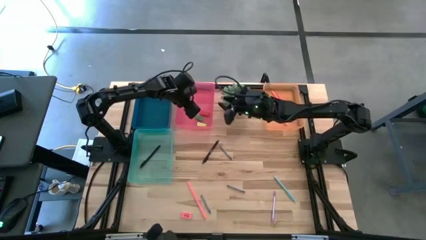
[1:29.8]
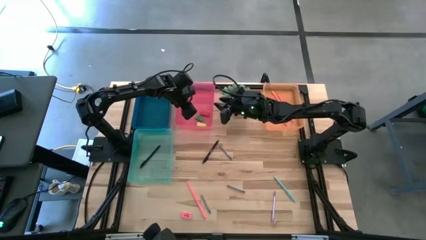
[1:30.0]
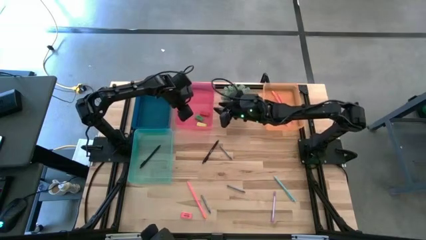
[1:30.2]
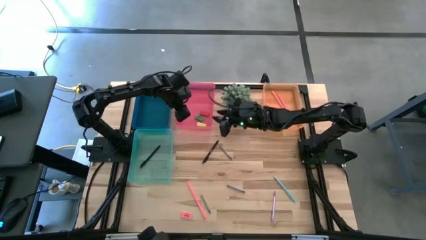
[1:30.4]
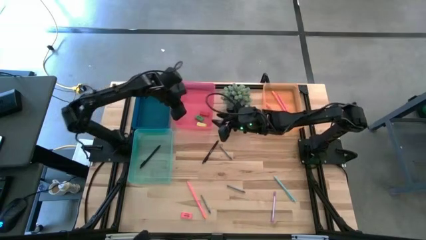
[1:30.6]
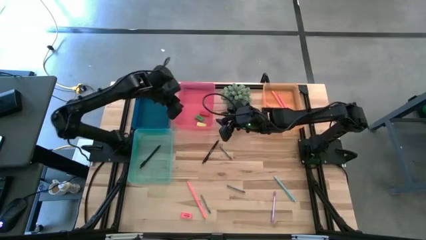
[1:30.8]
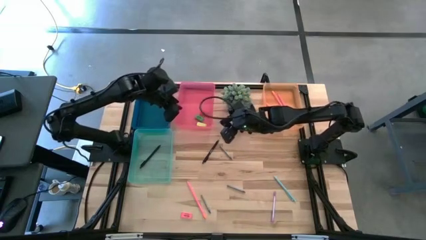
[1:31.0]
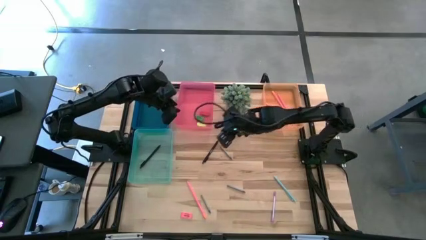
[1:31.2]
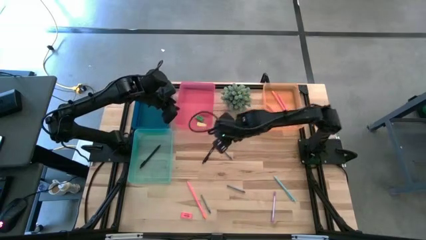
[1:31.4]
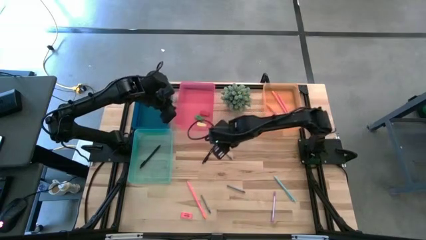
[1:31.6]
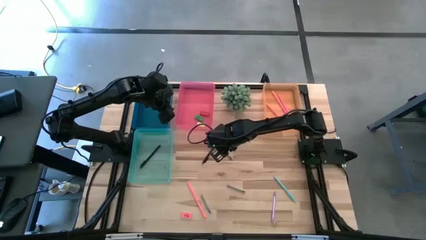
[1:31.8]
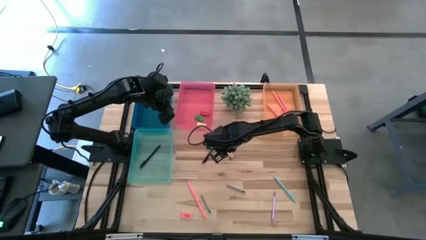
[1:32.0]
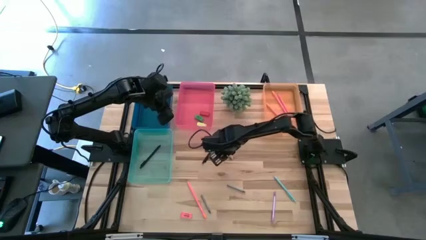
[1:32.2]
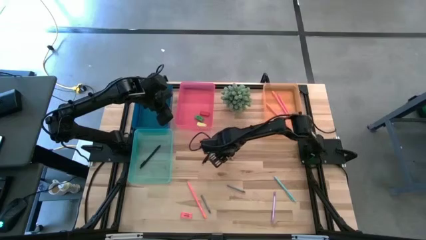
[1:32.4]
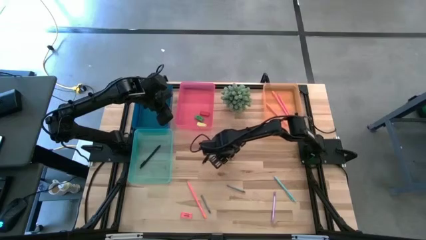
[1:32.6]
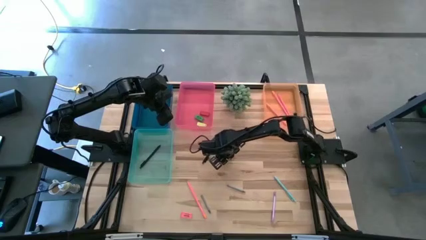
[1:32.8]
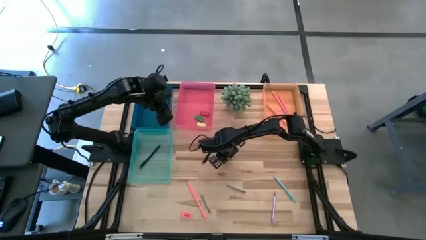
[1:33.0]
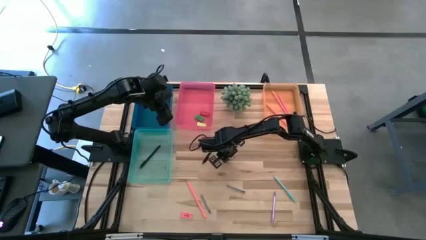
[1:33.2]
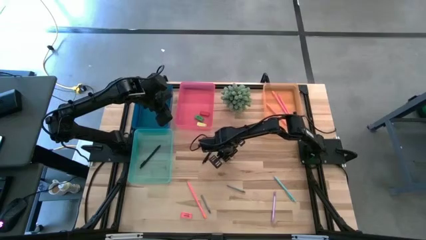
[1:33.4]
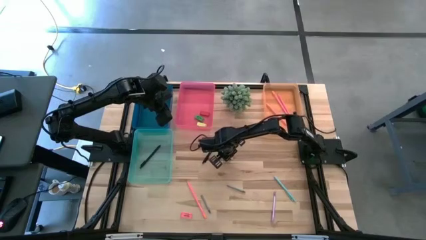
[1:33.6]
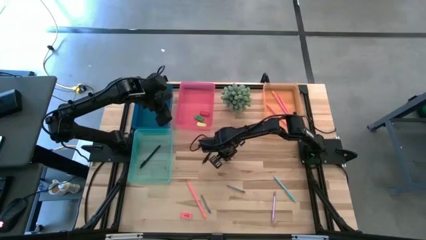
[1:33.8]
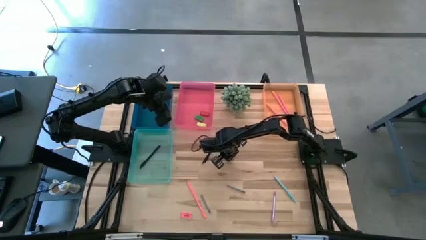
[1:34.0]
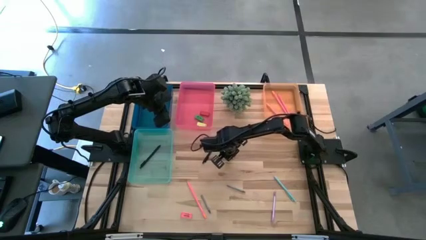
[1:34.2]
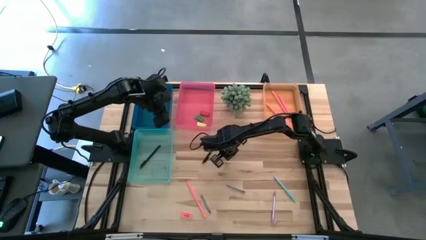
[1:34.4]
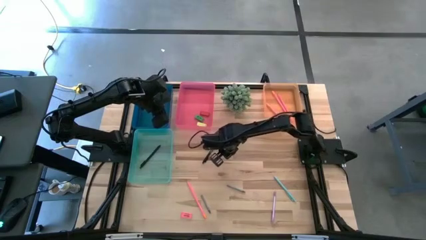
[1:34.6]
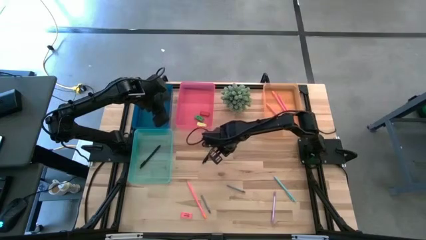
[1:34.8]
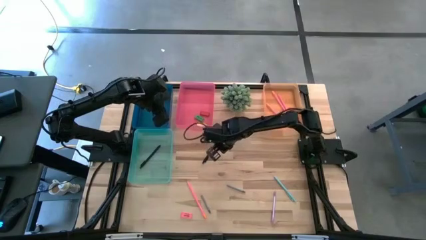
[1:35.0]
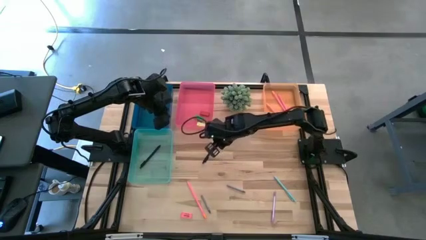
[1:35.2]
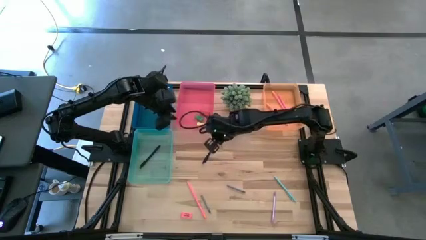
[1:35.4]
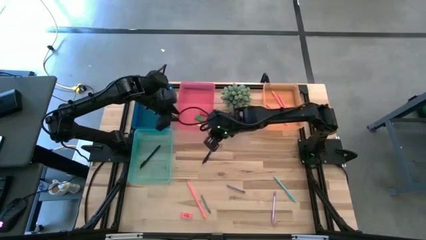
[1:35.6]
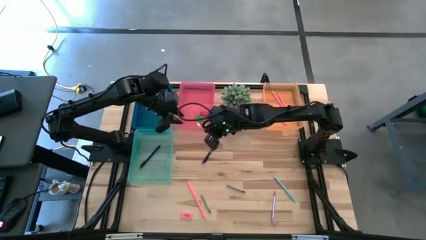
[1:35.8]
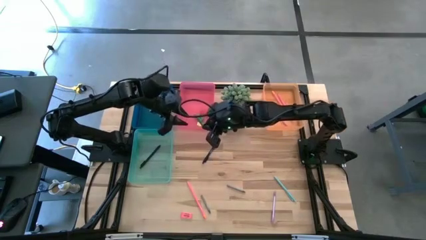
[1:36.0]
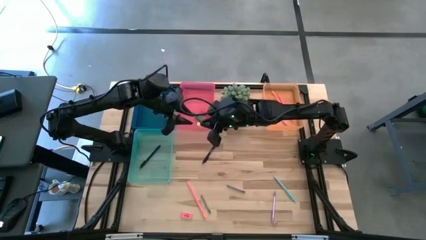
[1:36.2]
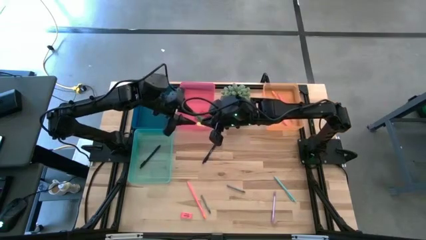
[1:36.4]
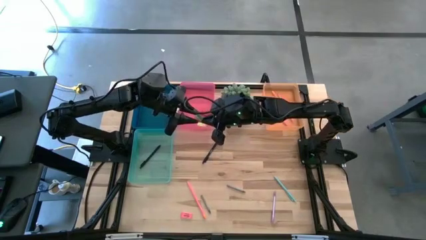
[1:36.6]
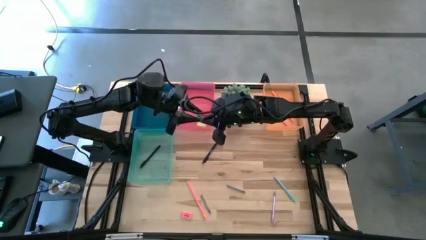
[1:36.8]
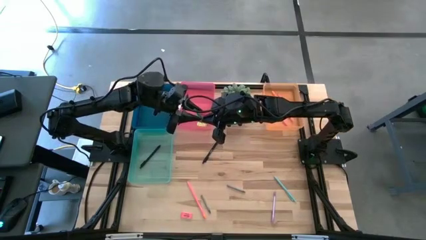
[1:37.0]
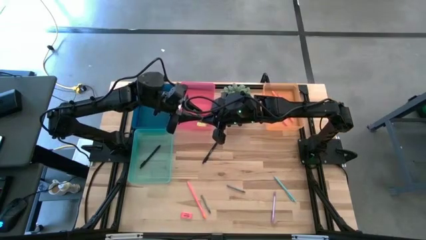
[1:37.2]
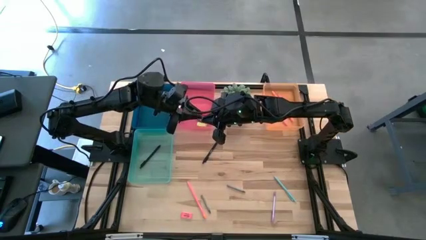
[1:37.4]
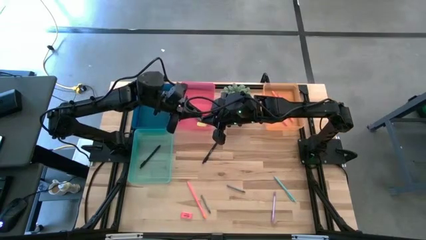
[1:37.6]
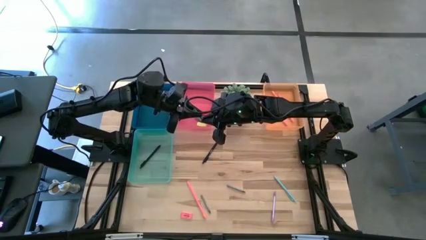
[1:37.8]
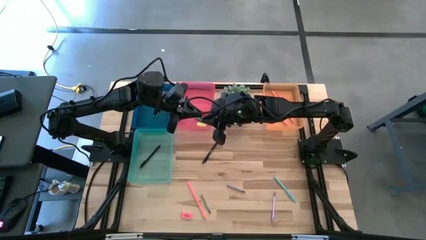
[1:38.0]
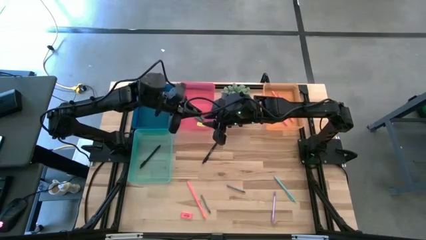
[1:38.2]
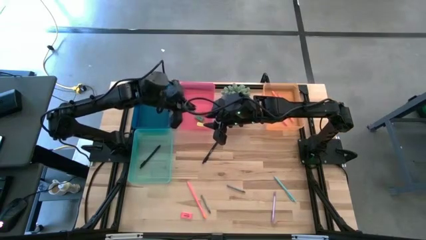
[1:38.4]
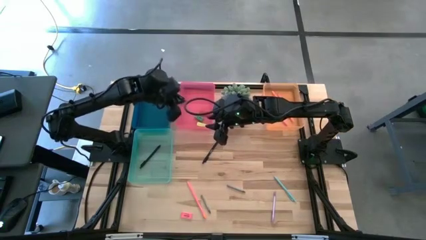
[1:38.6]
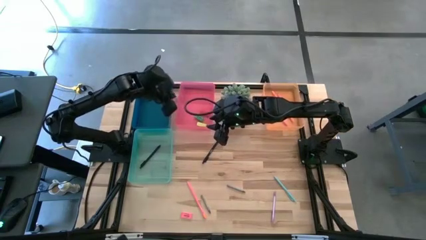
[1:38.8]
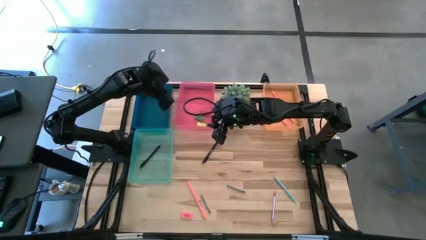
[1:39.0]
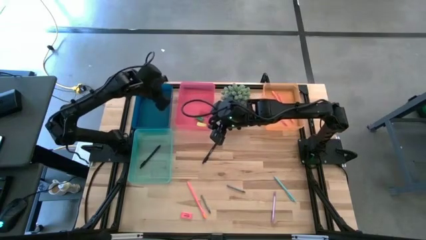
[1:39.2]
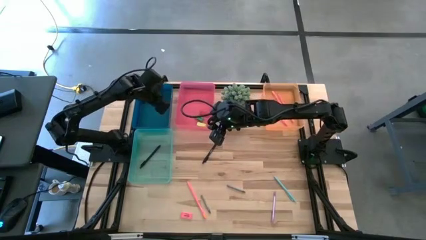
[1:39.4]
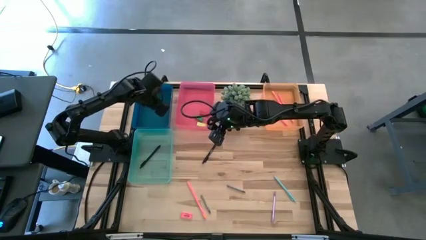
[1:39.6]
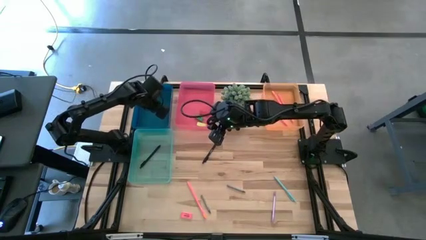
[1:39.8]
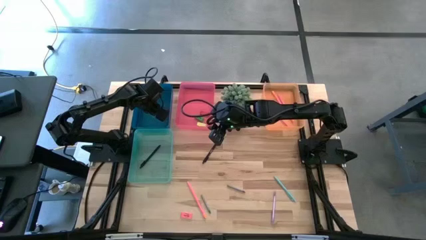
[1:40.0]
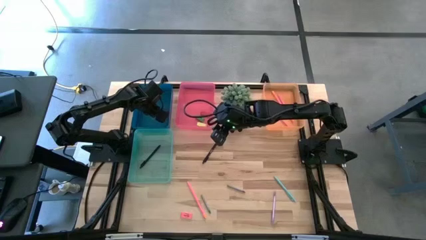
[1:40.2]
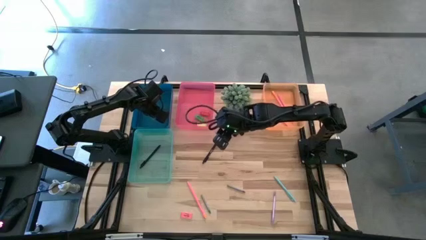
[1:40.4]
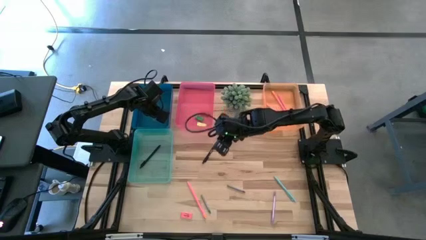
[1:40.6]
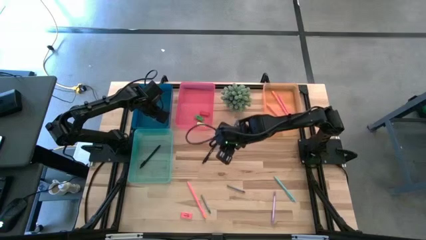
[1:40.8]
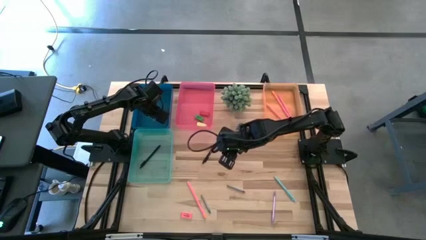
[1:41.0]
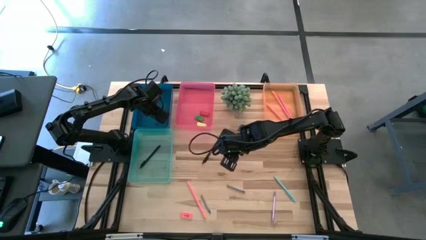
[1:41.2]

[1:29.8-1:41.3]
Task: Sort crayons/erasers/pens/pencils in bins
Put the gray crayon into the blue bin

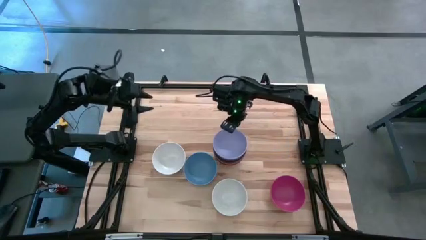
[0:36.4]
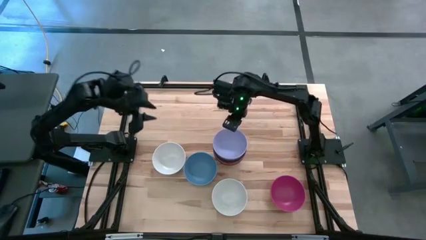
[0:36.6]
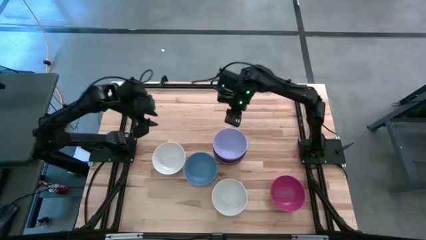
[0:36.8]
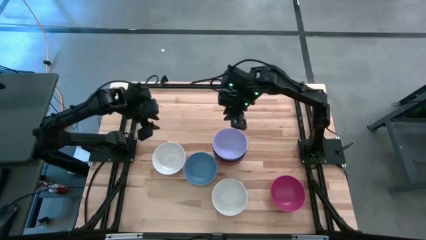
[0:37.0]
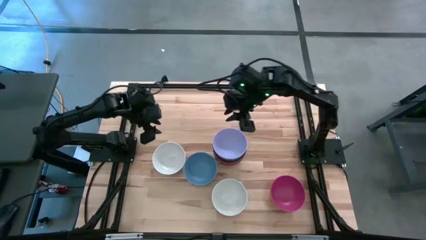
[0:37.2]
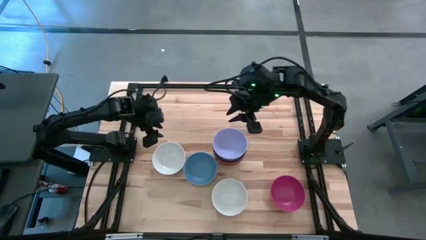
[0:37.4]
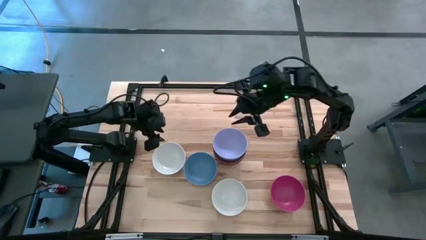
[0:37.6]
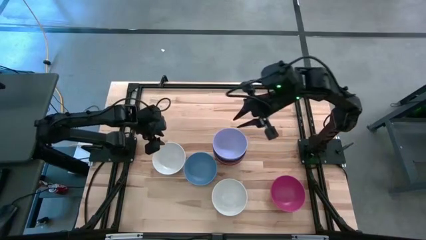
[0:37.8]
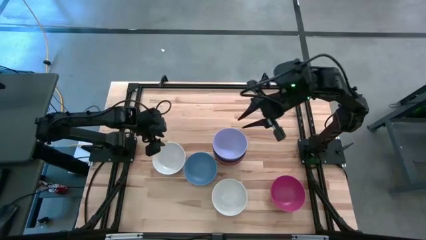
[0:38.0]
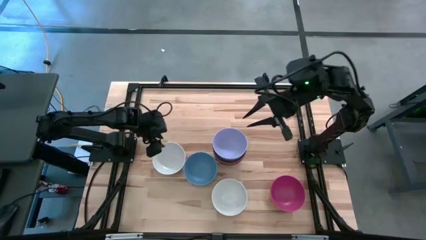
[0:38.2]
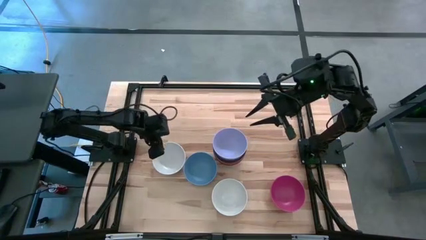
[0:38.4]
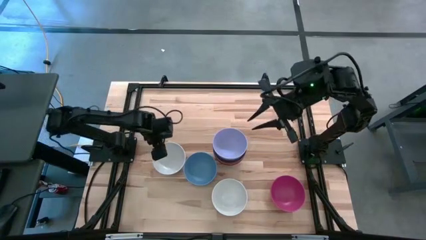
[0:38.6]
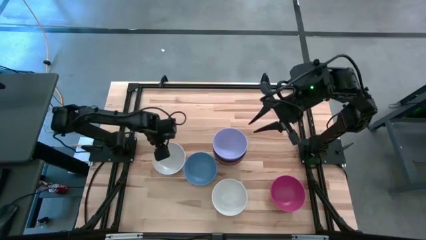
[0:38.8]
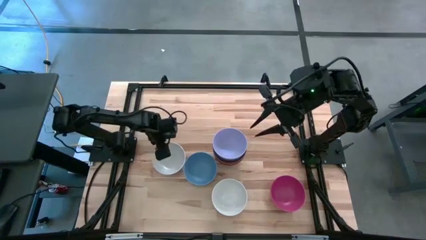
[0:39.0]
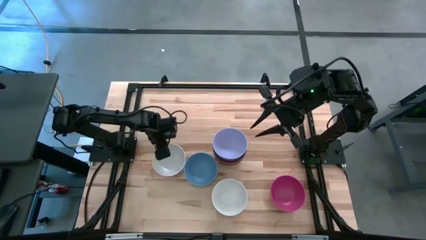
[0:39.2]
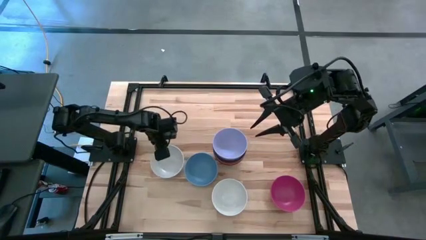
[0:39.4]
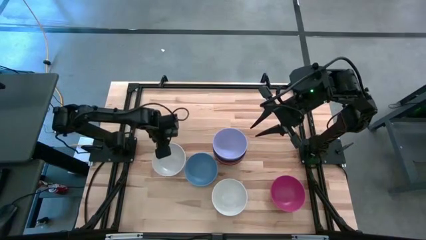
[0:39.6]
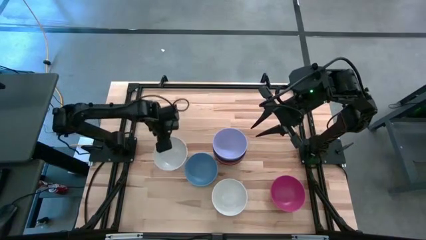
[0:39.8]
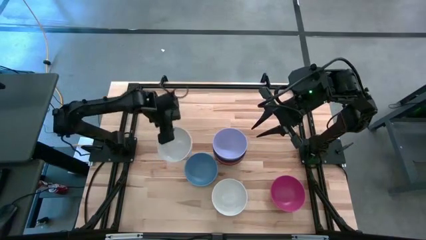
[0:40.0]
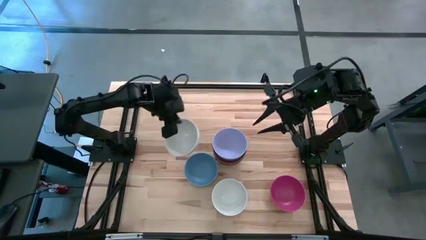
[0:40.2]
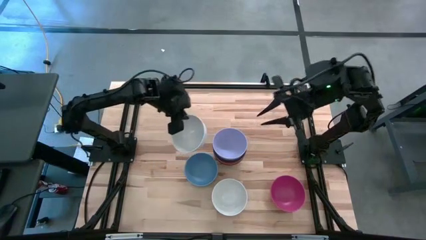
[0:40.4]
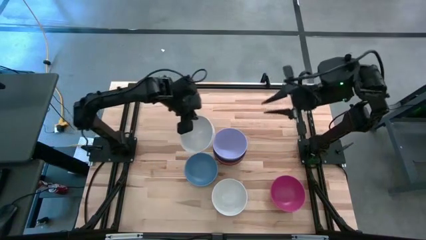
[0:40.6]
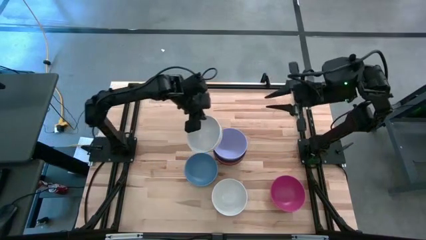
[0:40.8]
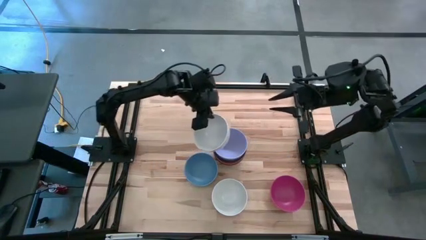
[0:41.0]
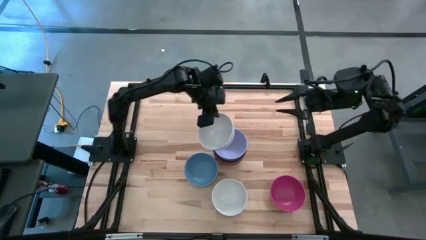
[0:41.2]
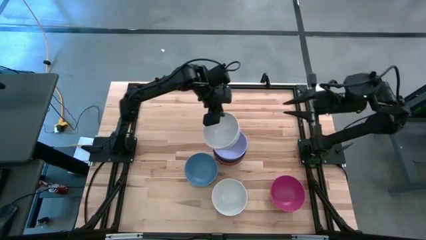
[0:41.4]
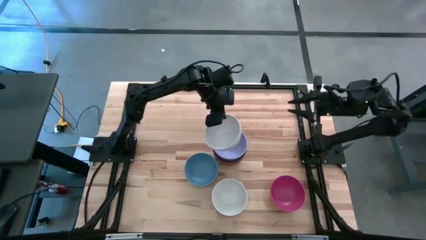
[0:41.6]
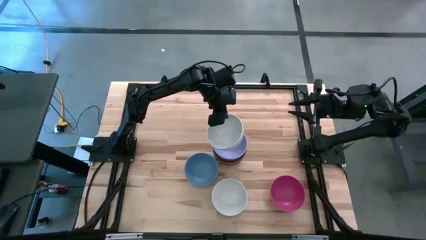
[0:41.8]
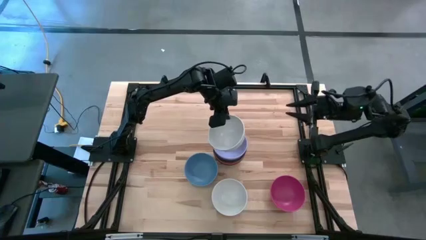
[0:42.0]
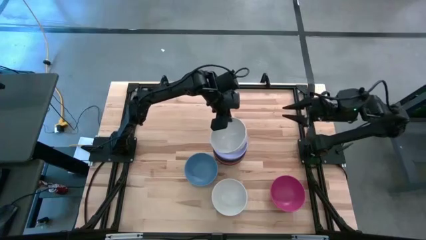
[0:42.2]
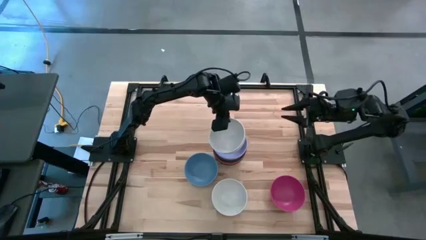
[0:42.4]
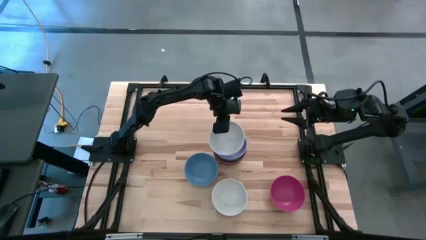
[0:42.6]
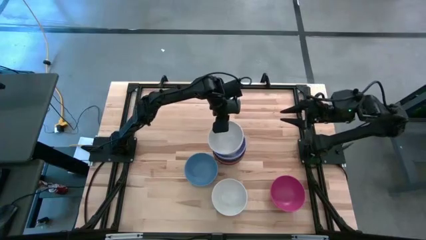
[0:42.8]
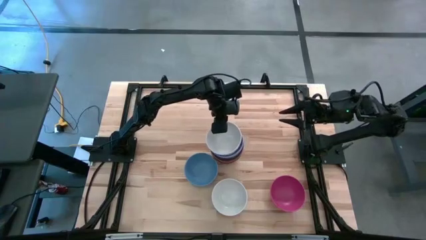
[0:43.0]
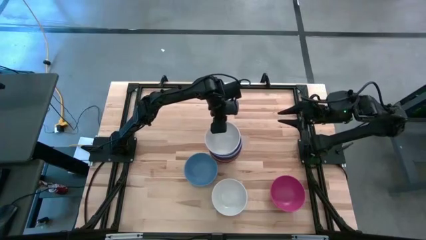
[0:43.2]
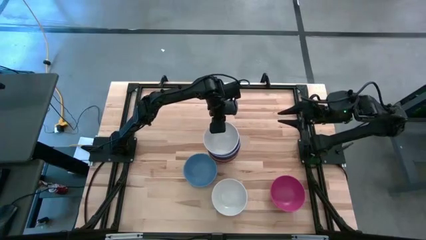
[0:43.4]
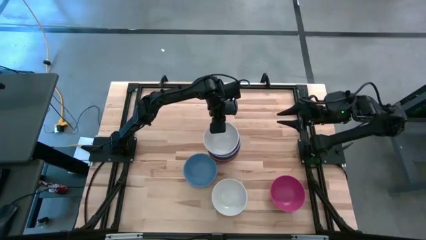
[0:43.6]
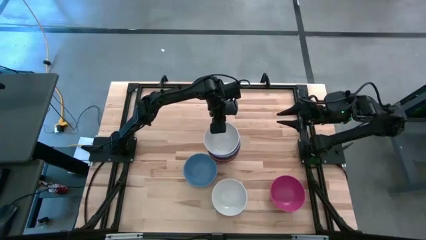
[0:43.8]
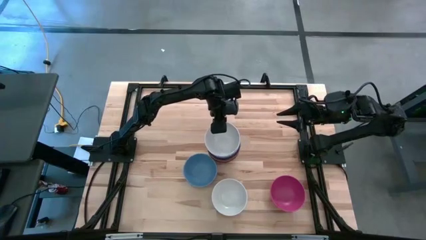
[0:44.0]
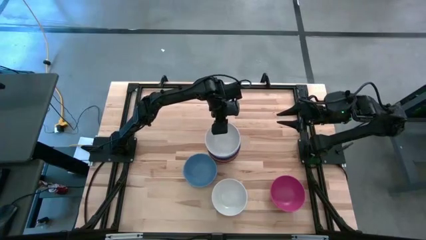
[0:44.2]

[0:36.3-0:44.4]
Task: Nest bowls inside each other
Stack the top white bowl on the purple bowl
